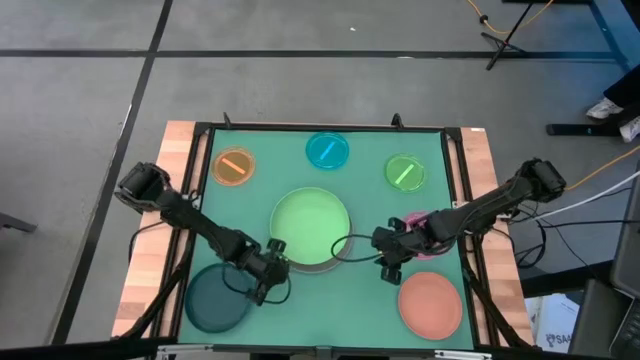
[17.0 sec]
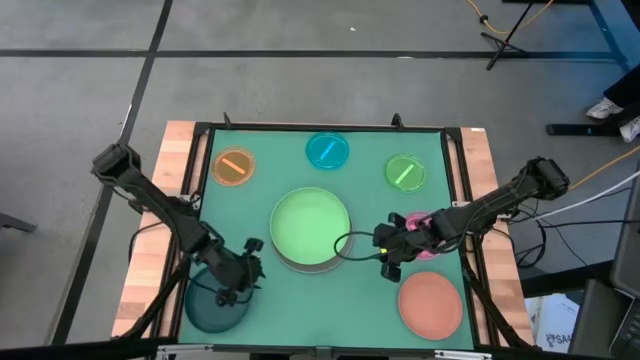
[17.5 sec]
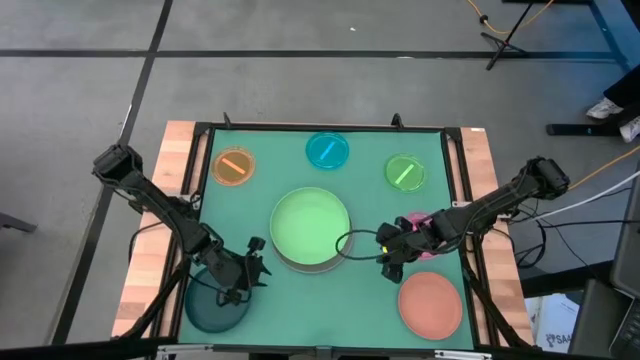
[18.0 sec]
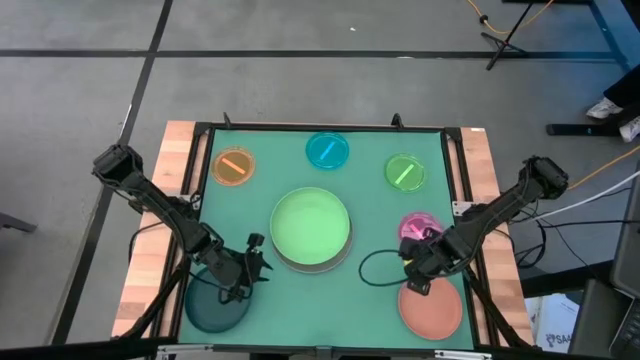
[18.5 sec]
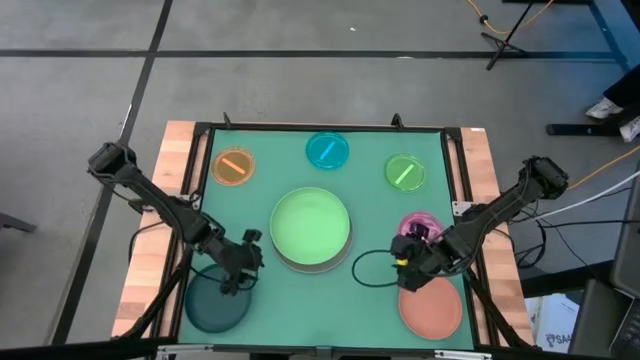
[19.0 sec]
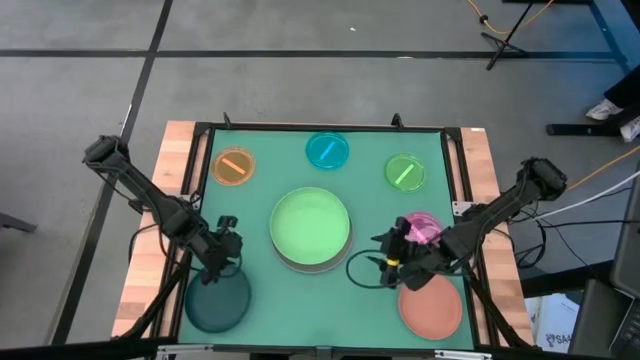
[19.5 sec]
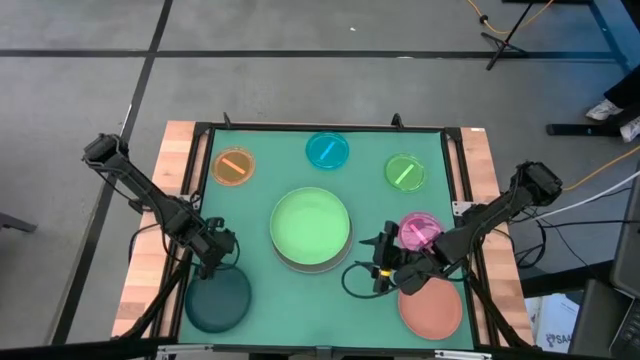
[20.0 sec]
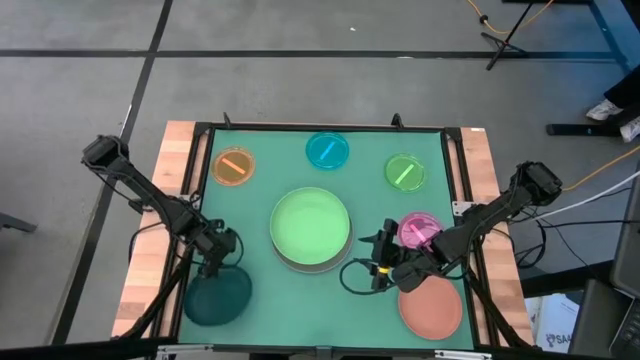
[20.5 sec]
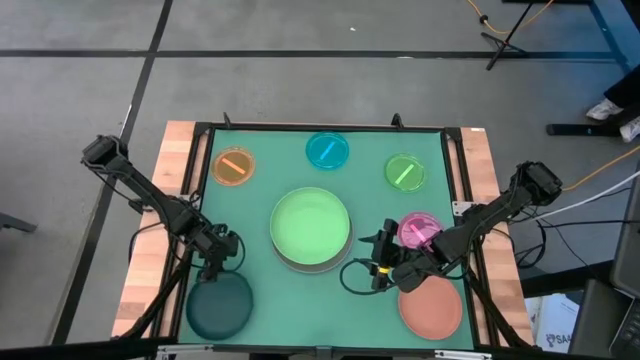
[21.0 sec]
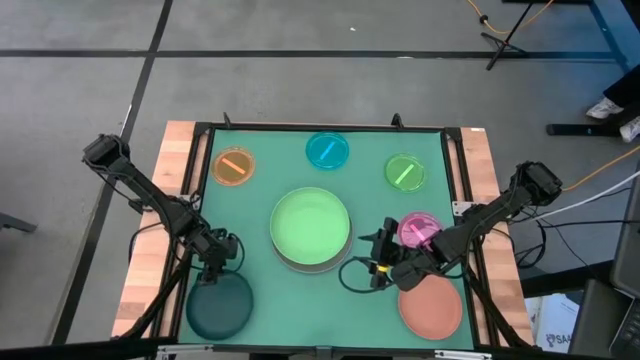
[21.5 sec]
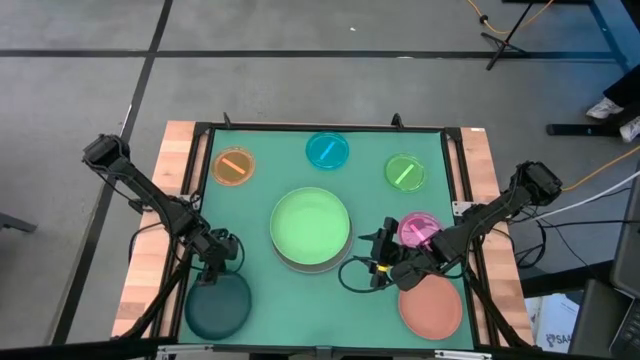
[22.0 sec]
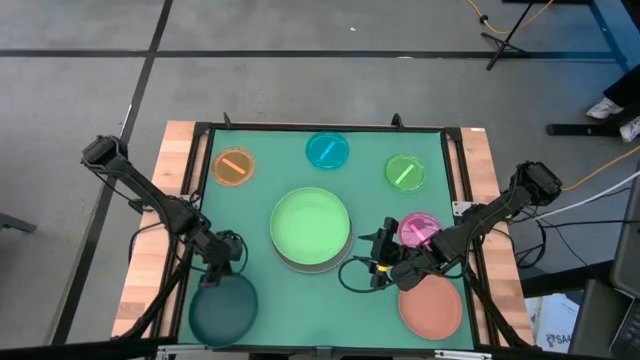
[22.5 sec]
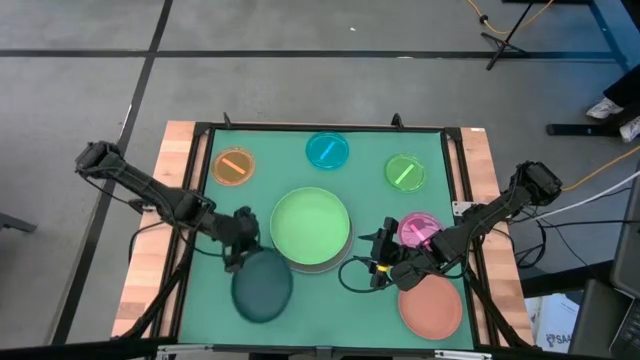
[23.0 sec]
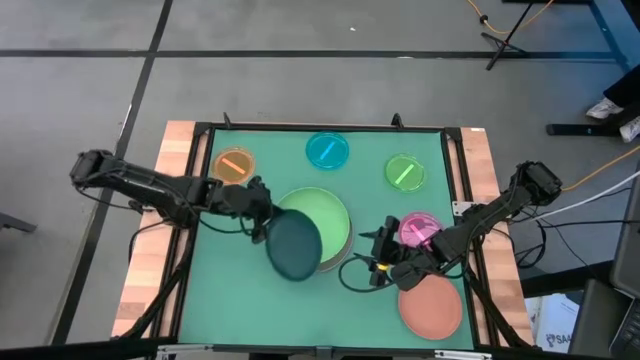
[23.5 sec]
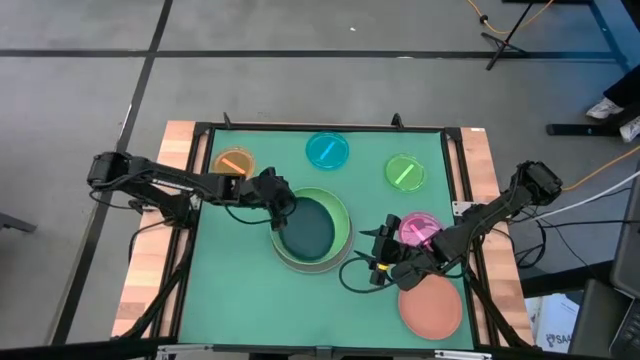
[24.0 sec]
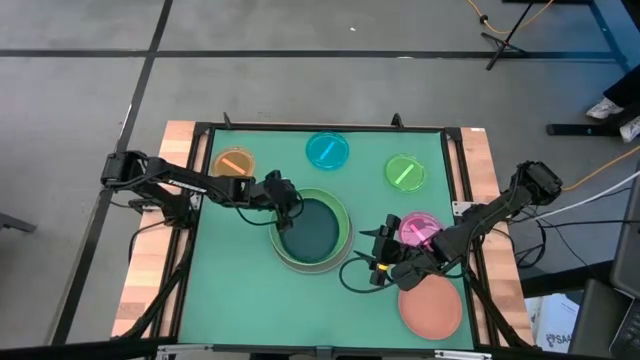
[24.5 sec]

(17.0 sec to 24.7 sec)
Task: Stack plastic plates
Stack the dark blue plate on the green plate

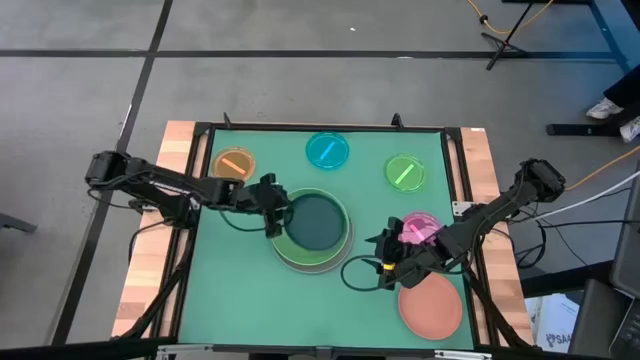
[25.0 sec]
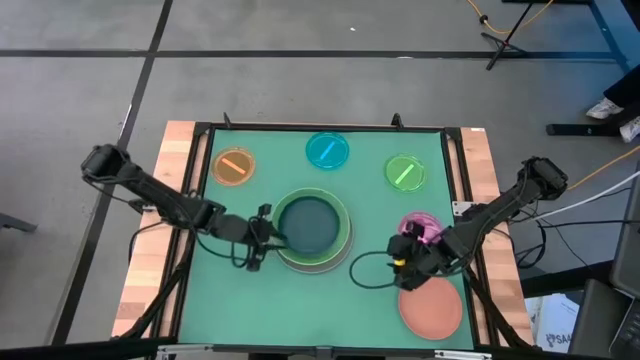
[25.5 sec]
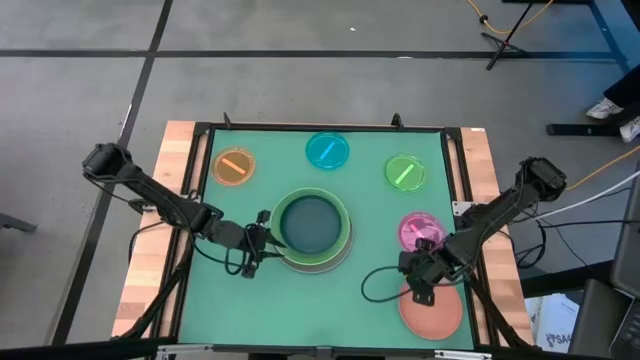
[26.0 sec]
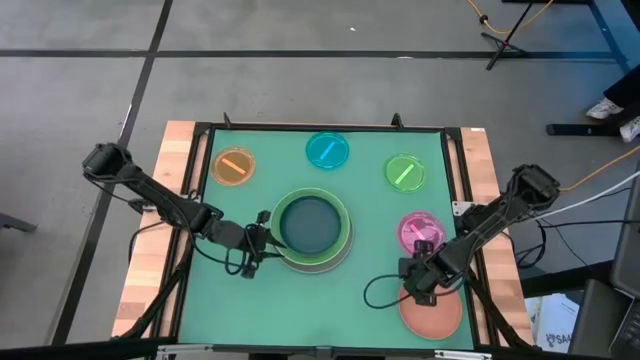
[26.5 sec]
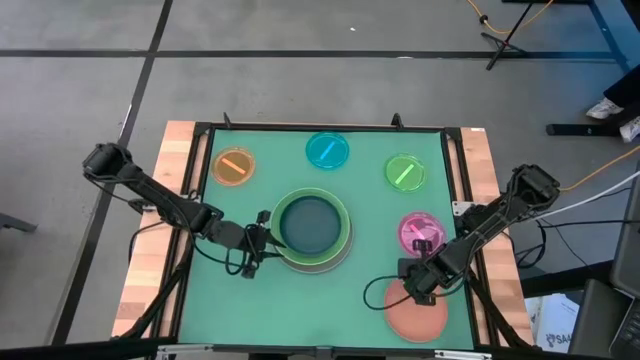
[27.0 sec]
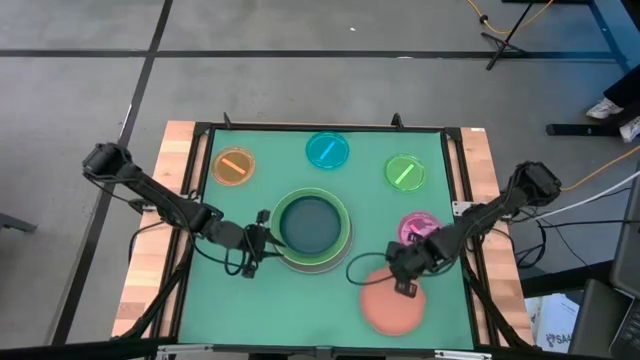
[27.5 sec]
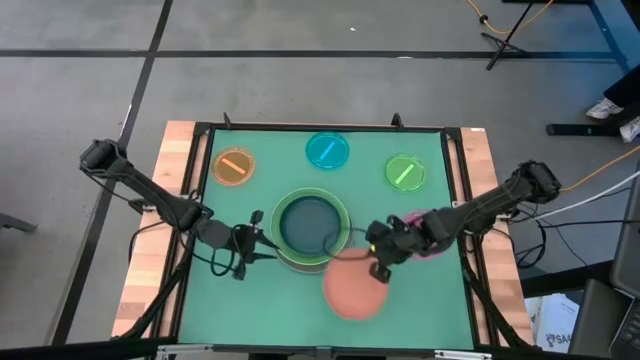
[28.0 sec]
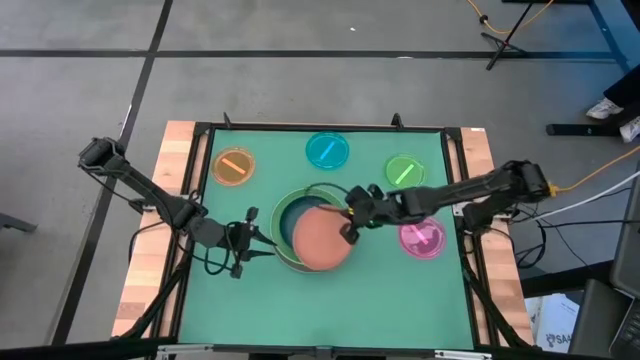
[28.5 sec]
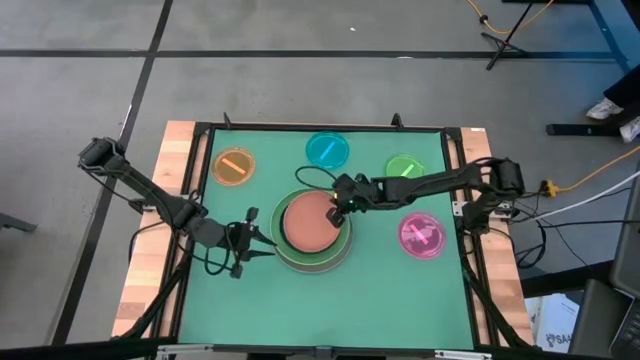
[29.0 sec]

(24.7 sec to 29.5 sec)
Stack the orange plate on the dark blue plate

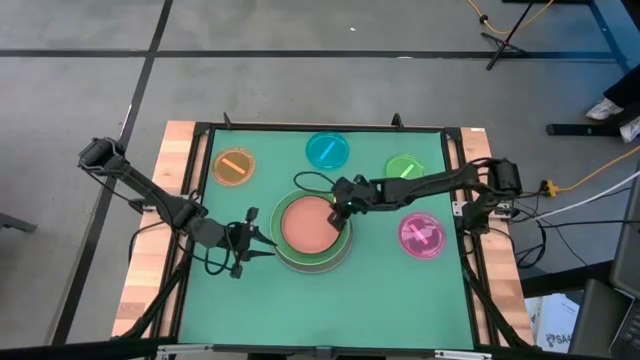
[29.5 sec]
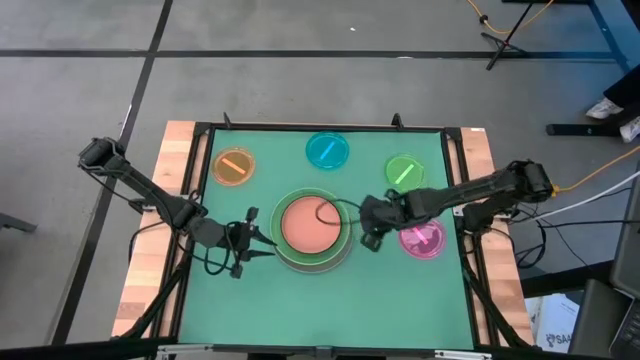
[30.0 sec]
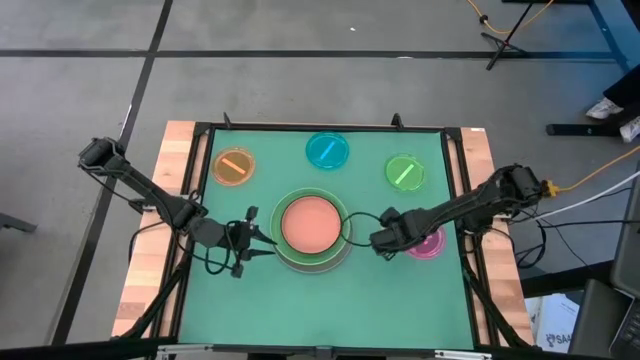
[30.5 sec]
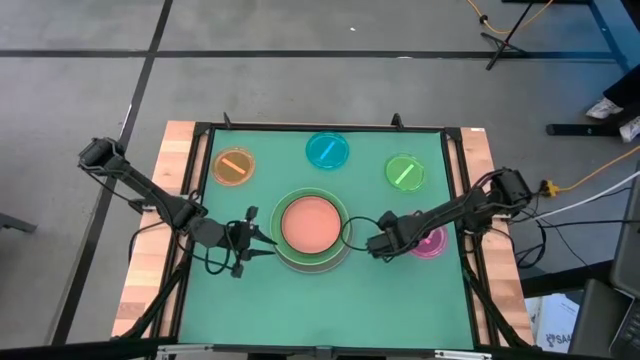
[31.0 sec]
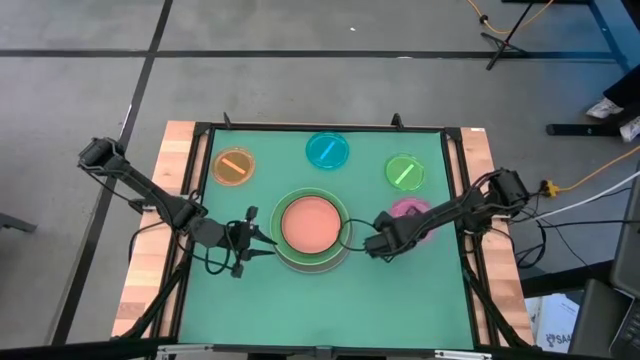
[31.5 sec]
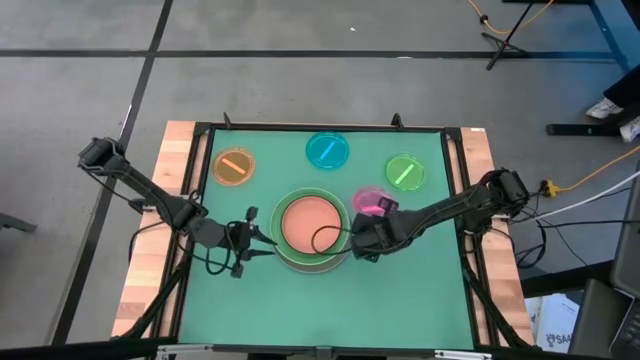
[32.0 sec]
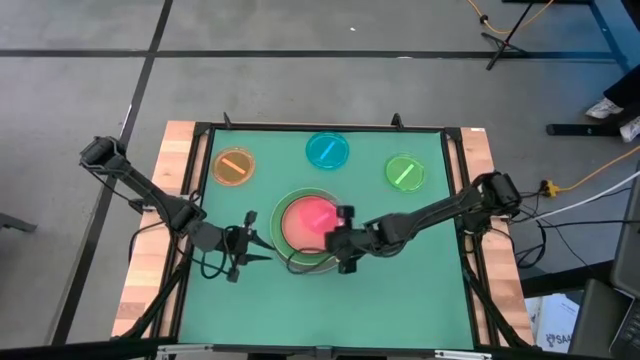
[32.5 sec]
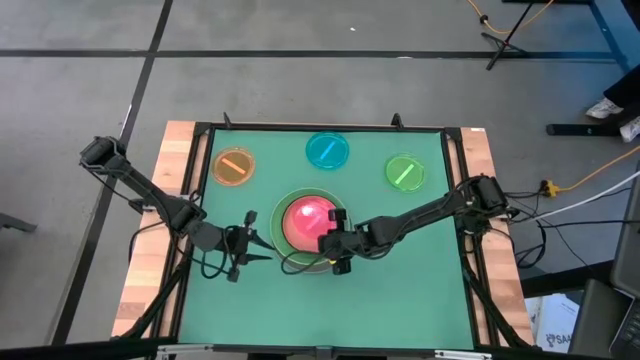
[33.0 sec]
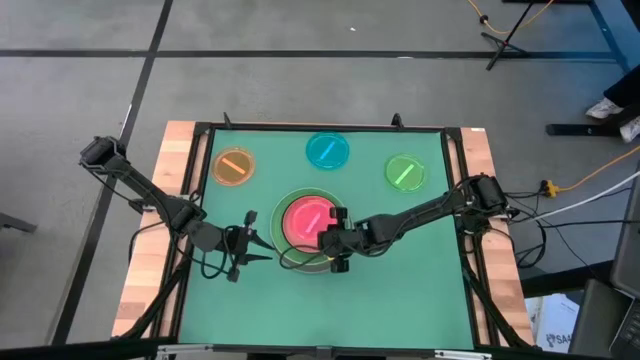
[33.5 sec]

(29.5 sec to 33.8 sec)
Stack the pink plate on the orange plate

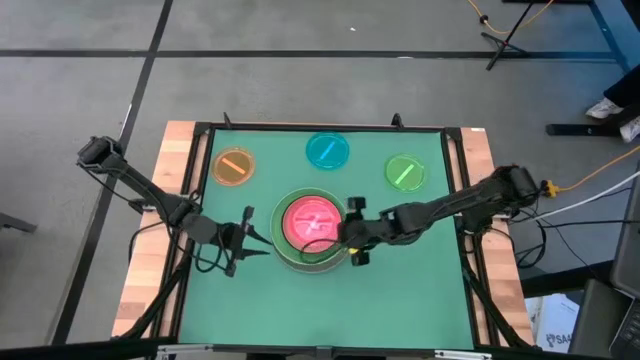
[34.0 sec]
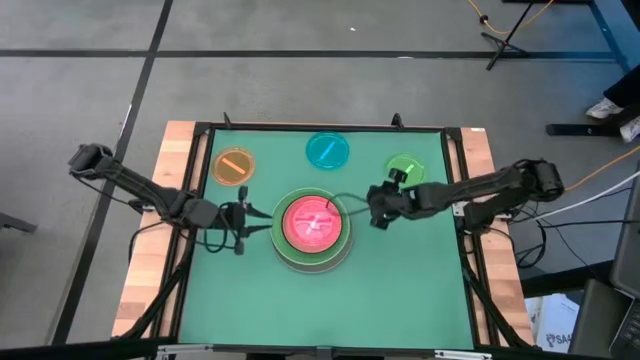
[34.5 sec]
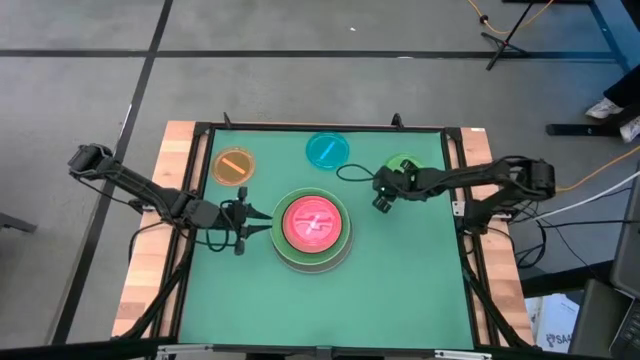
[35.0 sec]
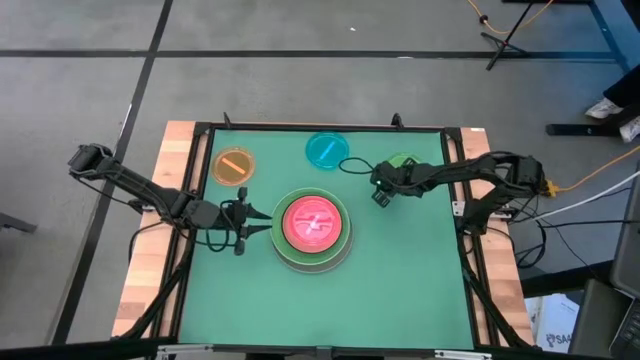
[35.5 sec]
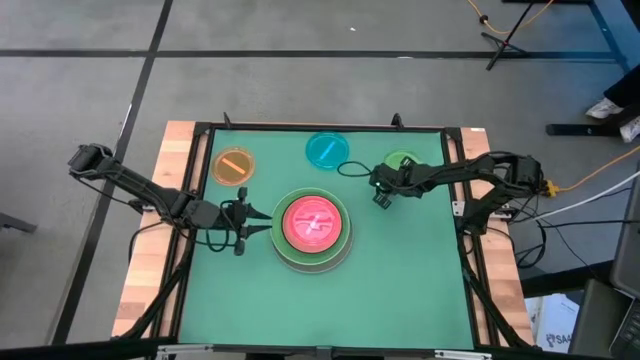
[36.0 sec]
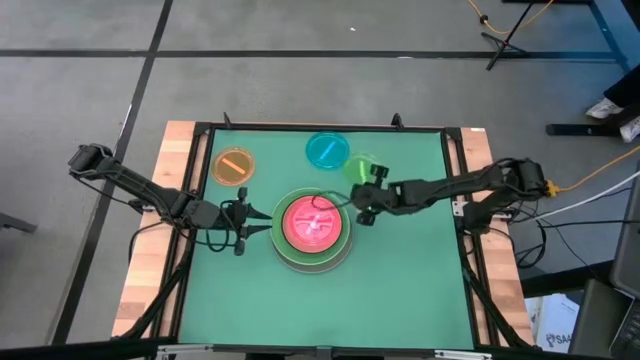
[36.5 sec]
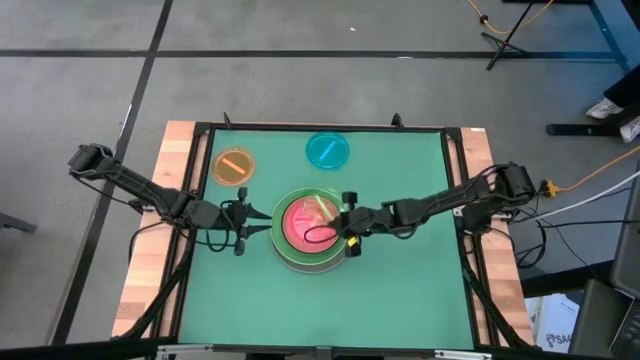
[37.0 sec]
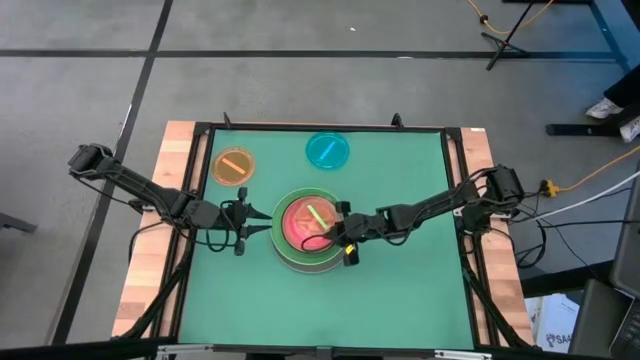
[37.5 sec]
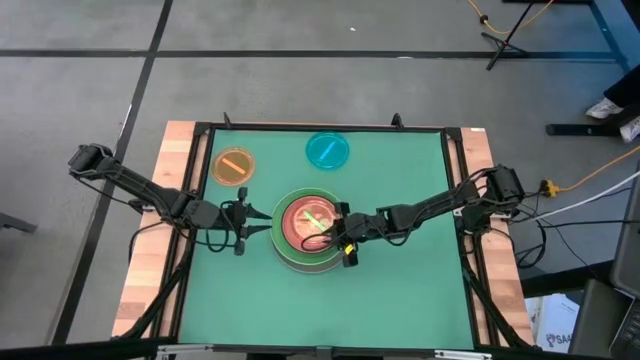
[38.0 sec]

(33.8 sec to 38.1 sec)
Stack the light green plate on the pink plate
